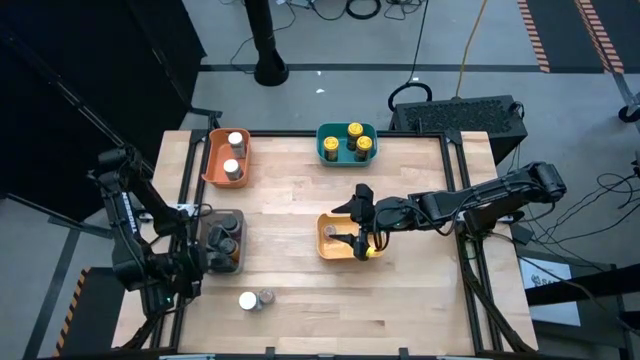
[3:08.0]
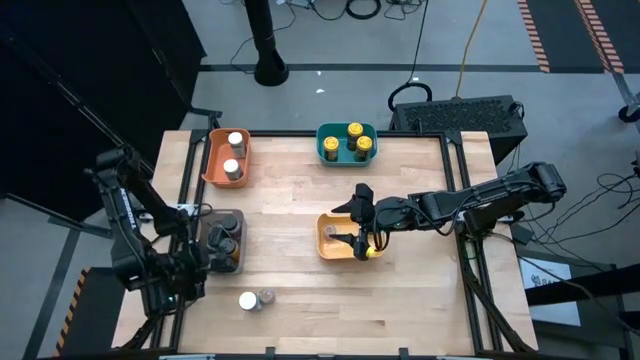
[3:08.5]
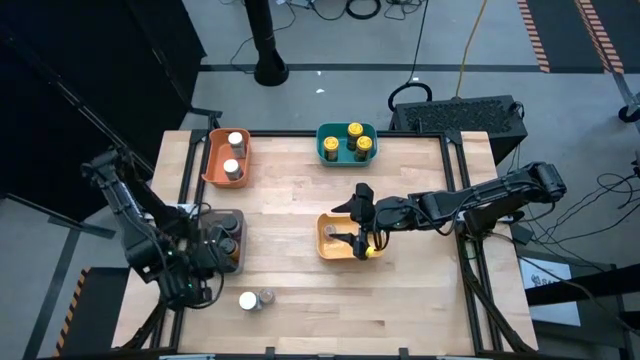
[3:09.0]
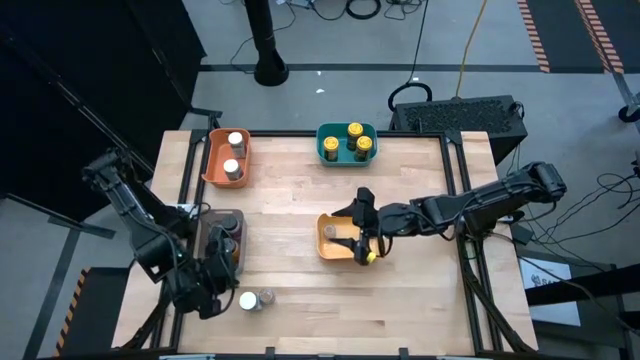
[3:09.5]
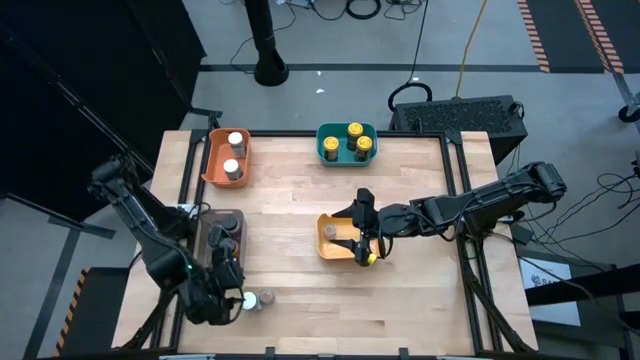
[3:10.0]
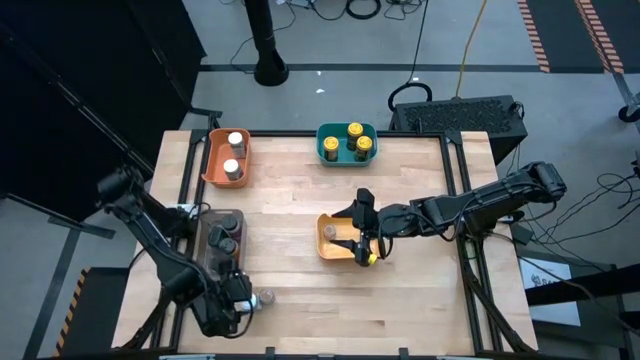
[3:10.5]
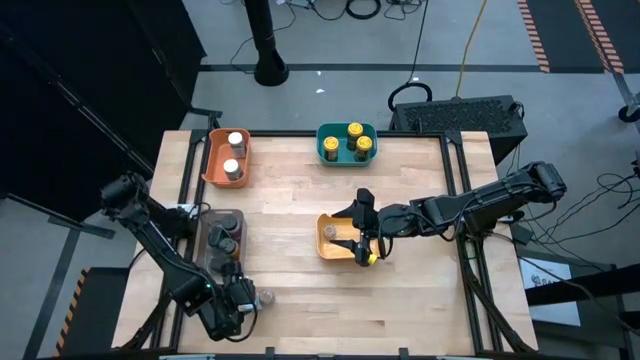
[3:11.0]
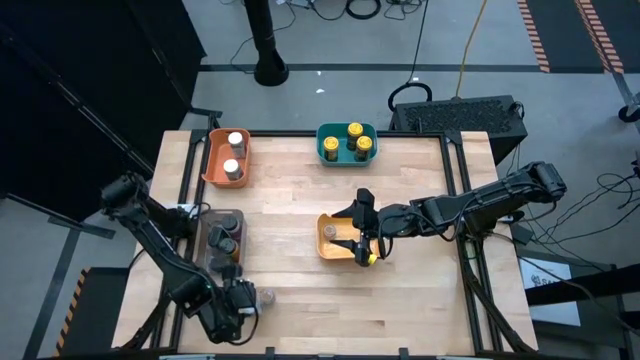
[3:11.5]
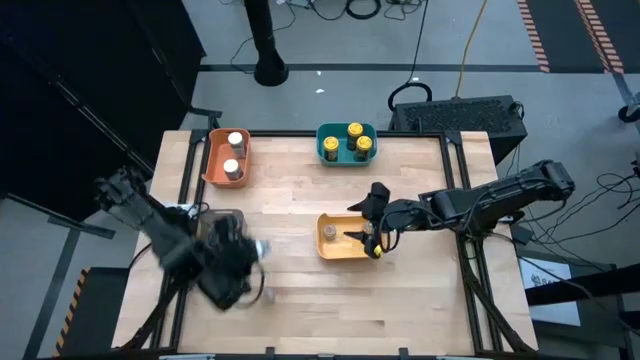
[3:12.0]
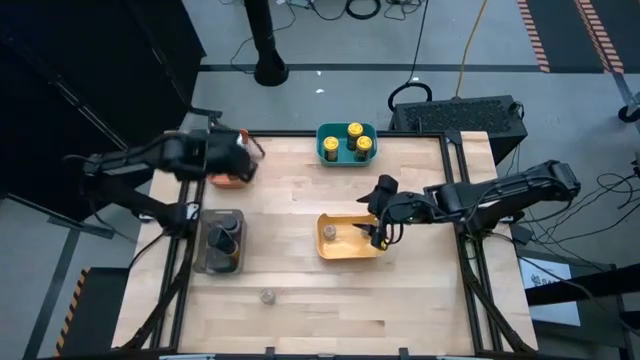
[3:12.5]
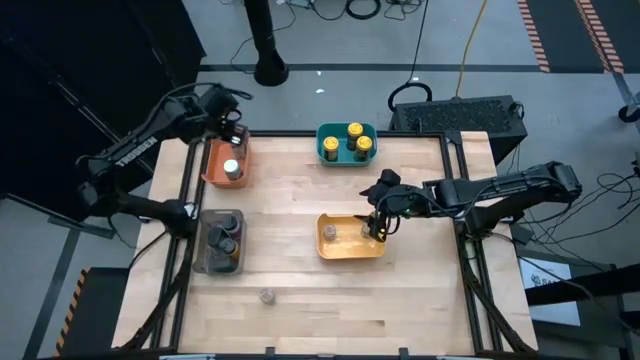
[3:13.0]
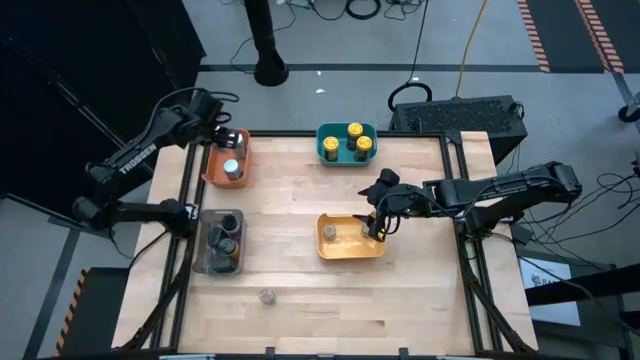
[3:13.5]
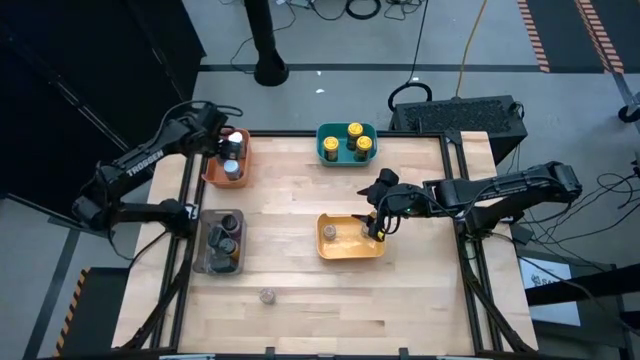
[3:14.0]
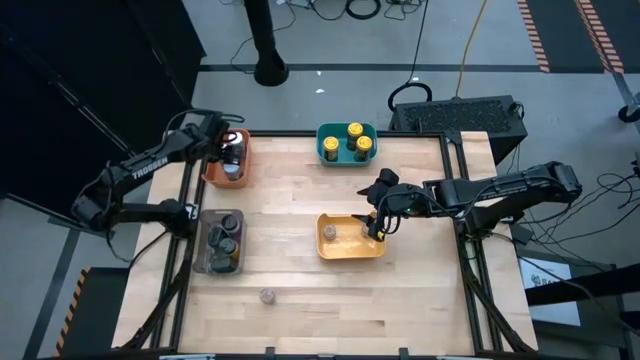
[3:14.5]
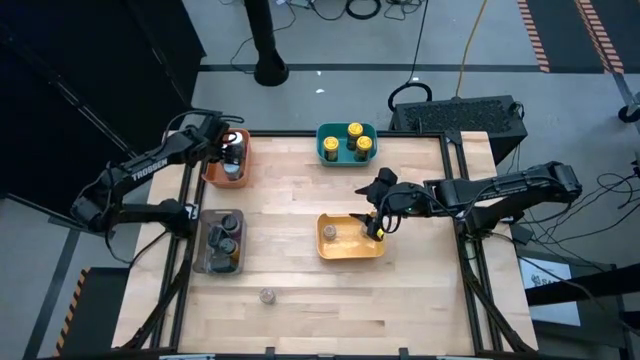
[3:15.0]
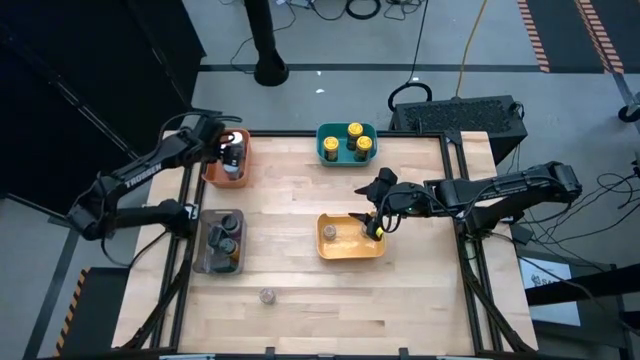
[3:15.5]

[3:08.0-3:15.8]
Task: Sort spices by type
Put the white spice bottle into the orange bin

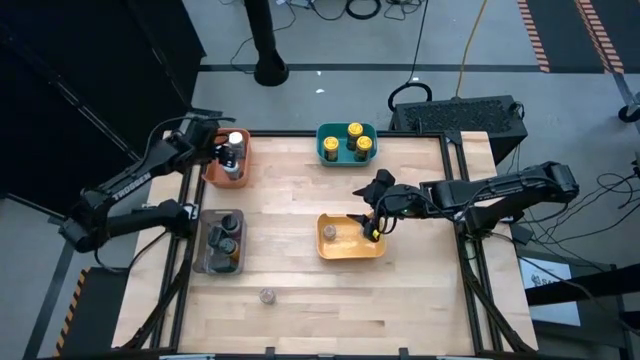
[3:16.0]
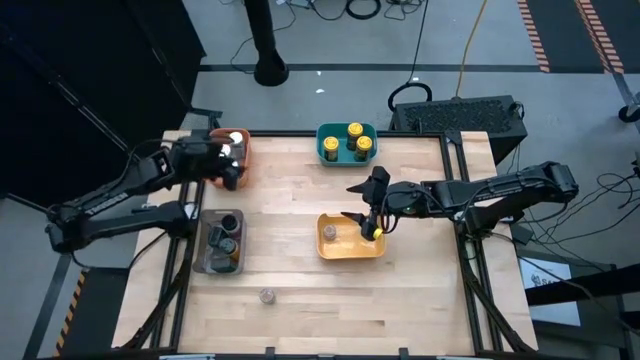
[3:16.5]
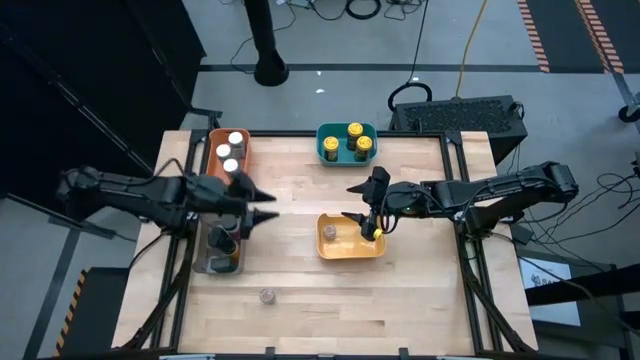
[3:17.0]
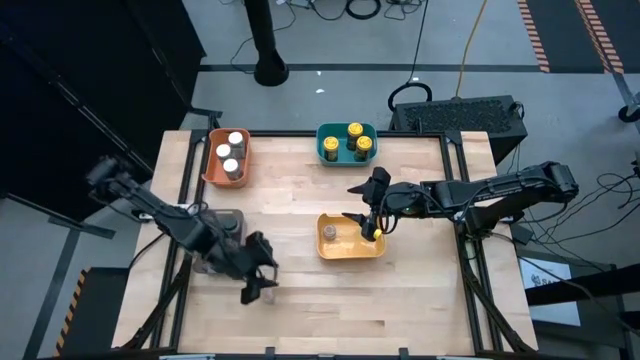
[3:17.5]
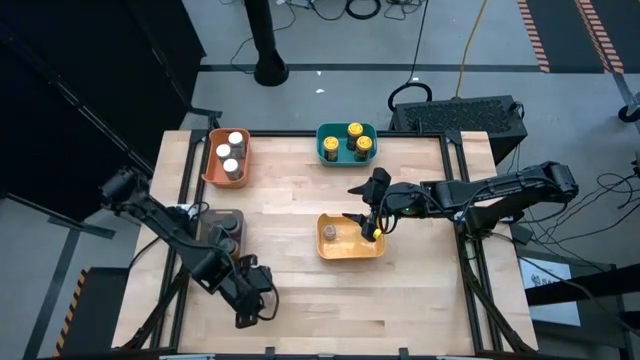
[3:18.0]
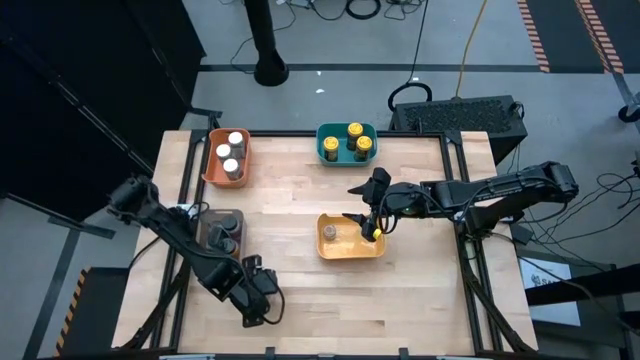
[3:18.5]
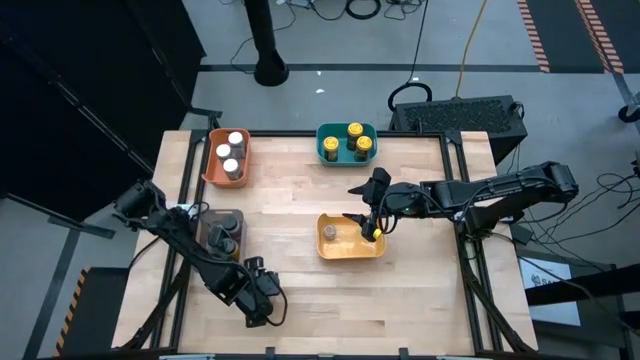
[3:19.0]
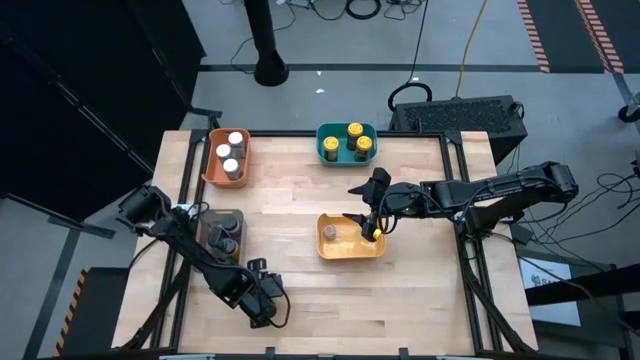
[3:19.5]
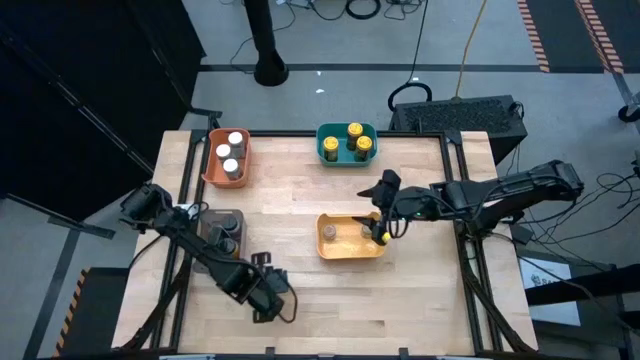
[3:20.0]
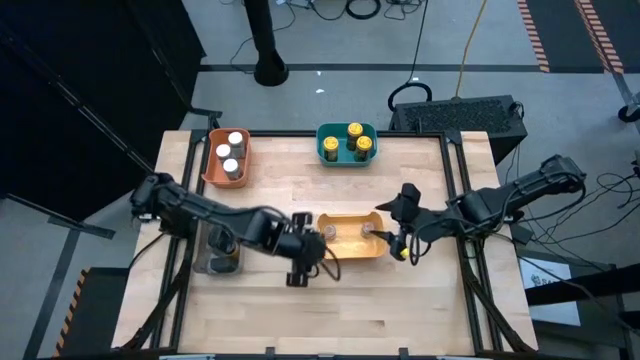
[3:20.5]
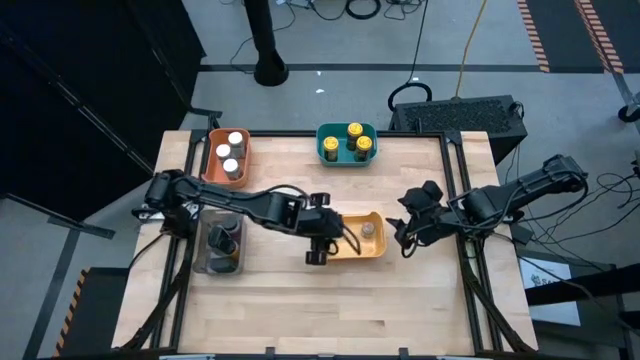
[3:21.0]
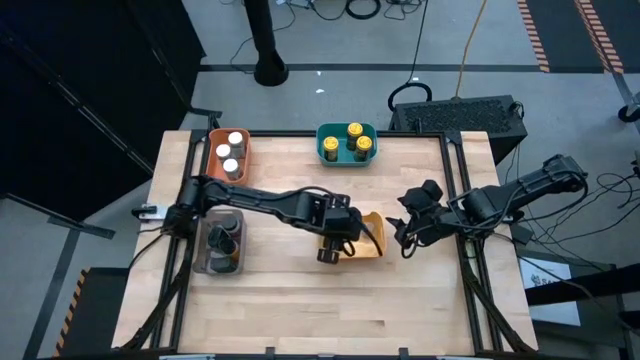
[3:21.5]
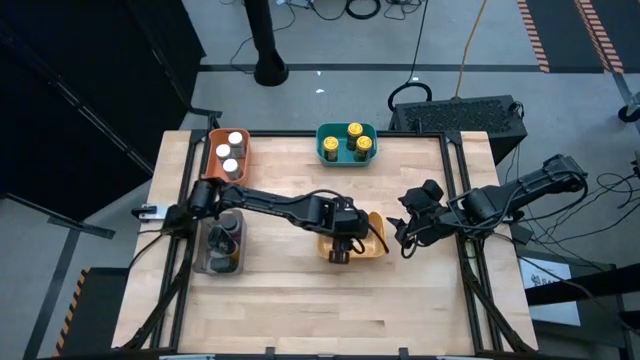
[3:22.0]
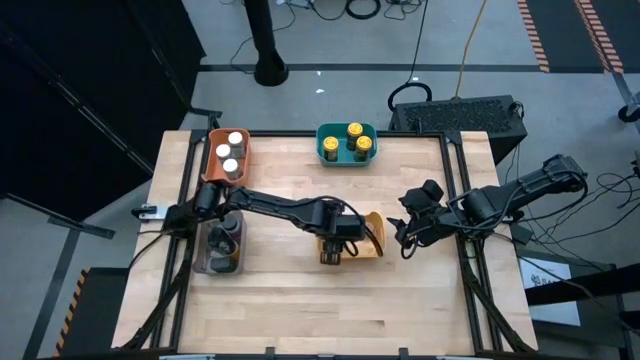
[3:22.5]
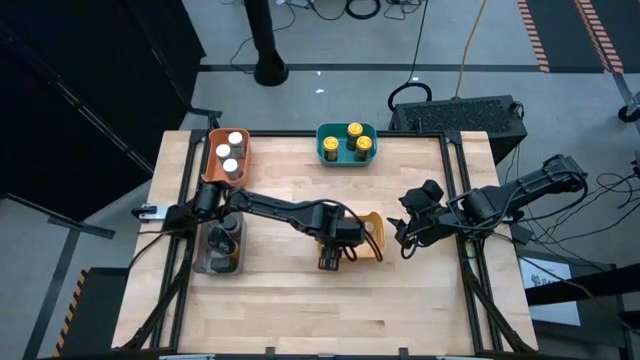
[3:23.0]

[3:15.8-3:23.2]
Put the brown spice bottle into the yellow bin

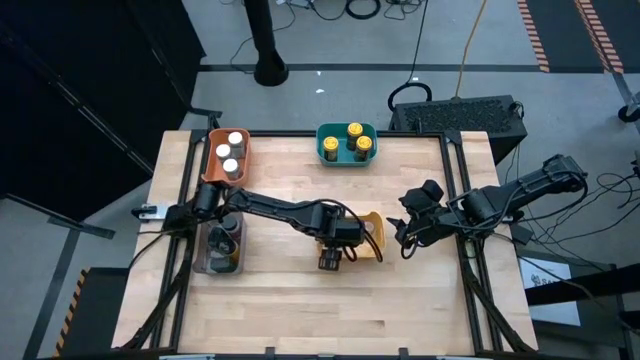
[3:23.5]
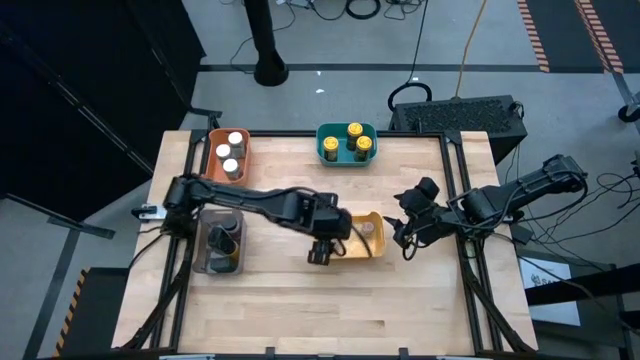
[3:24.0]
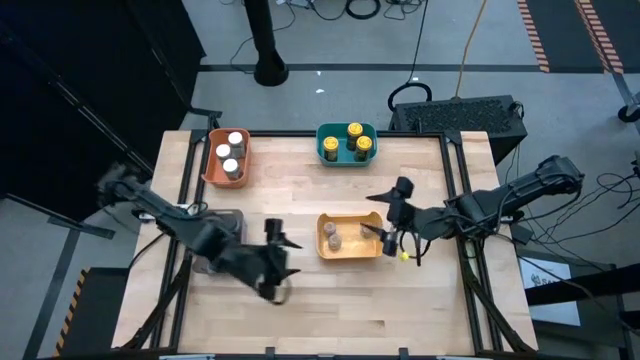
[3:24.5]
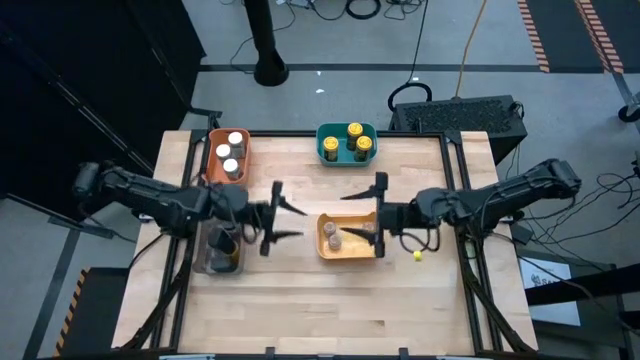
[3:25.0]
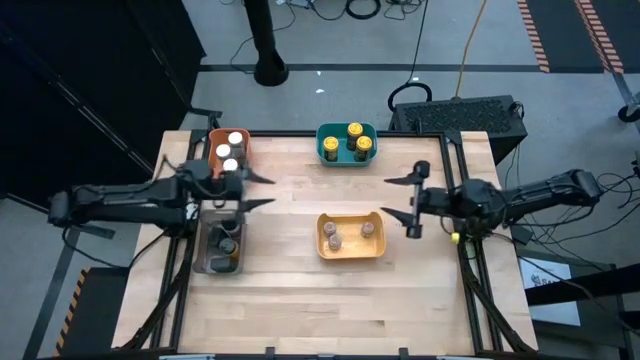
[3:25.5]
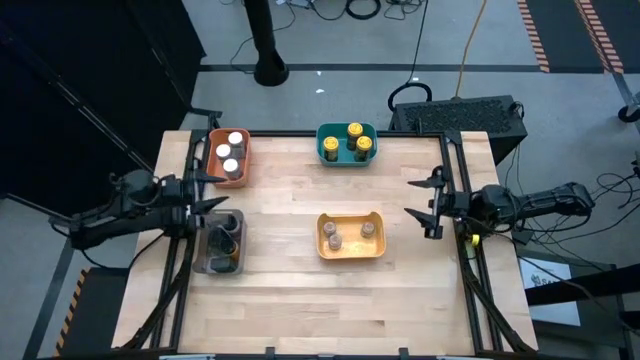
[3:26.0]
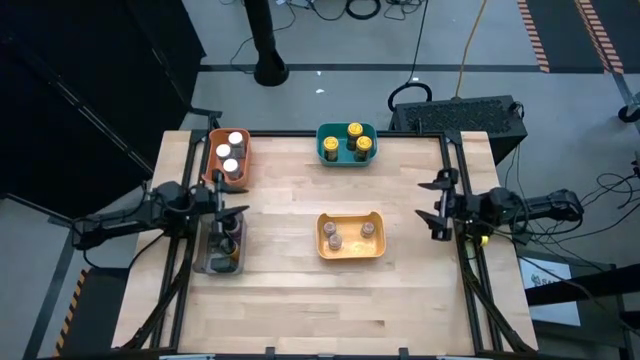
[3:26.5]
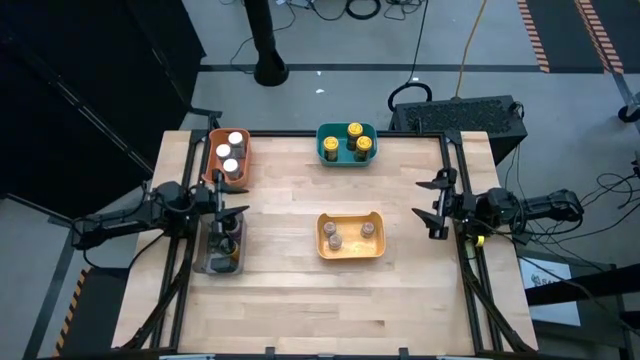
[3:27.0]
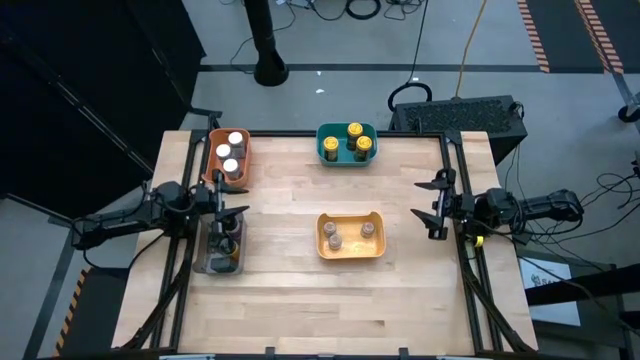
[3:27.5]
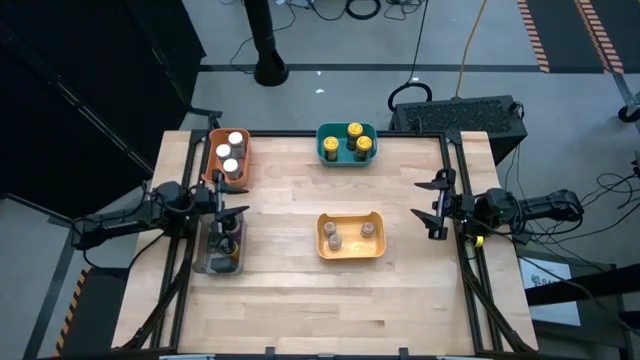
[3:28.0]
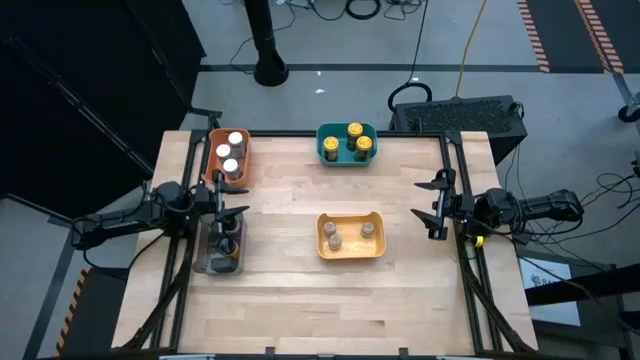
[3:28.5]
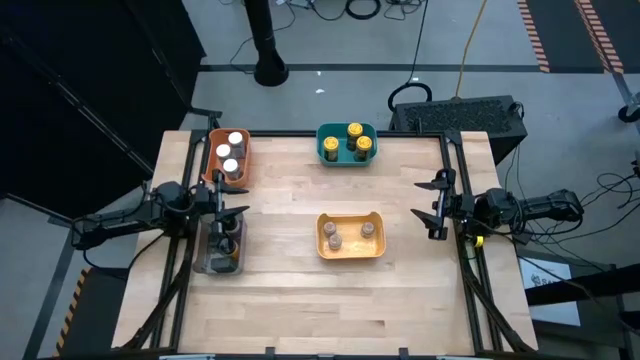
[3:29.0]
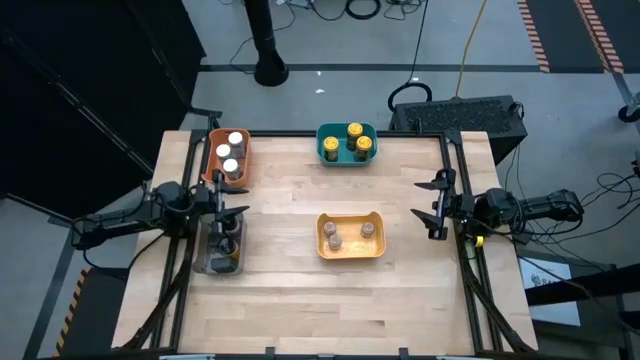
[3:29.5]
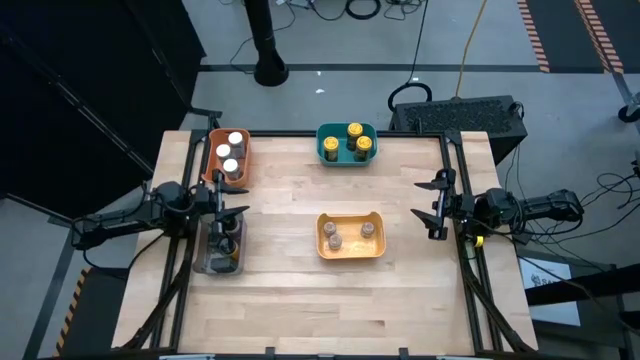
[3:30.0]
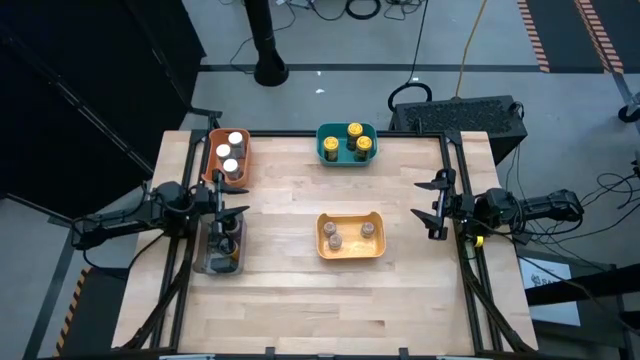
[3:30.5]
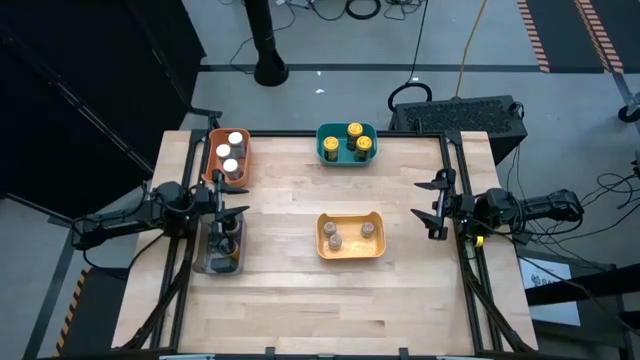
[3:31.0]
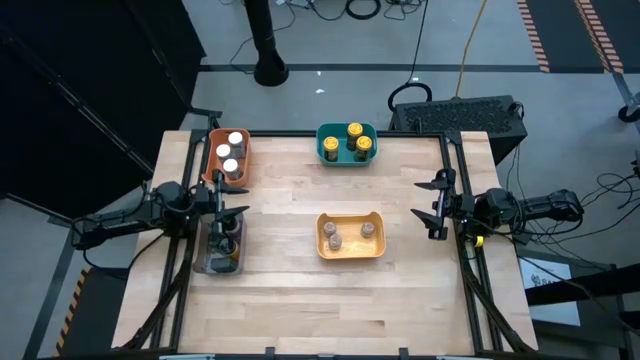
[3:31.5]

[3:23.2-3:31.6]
Return to Home Position
